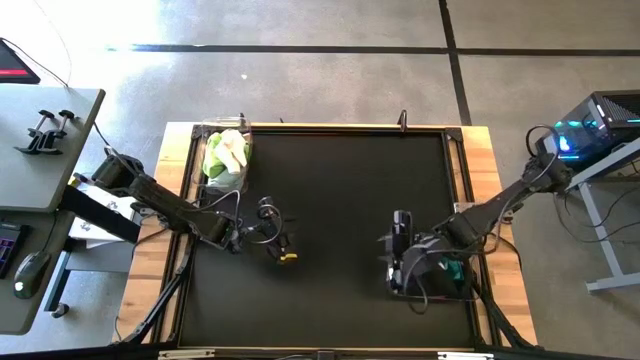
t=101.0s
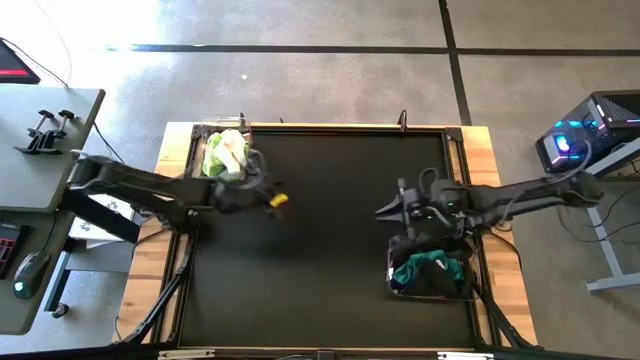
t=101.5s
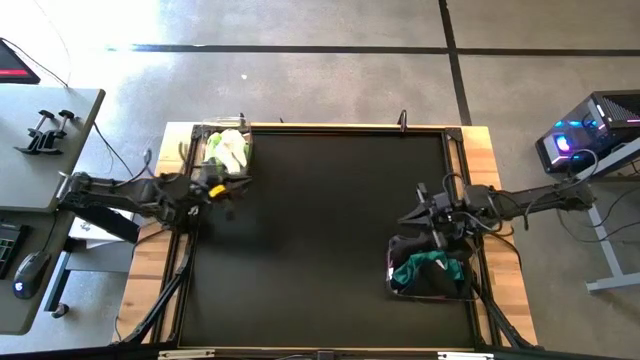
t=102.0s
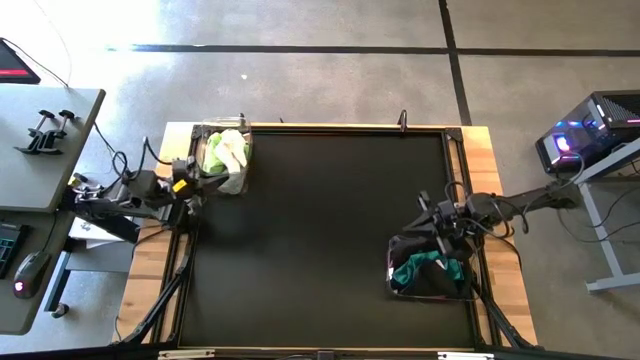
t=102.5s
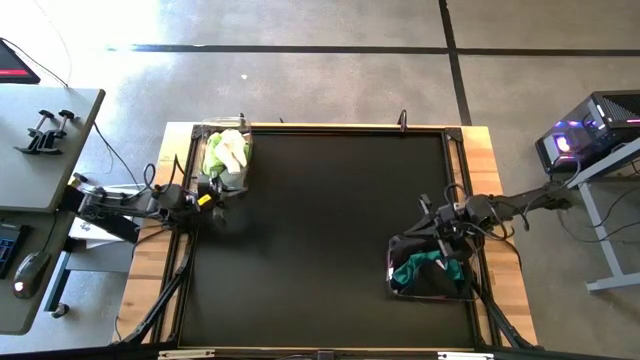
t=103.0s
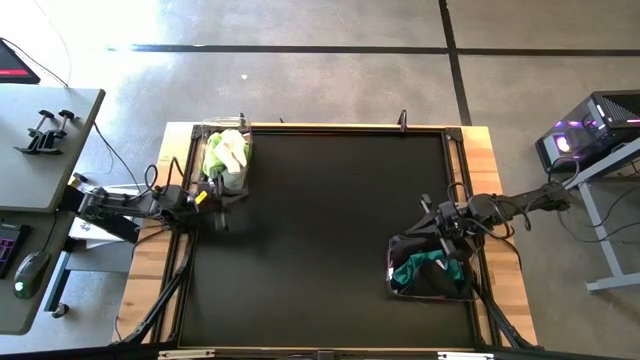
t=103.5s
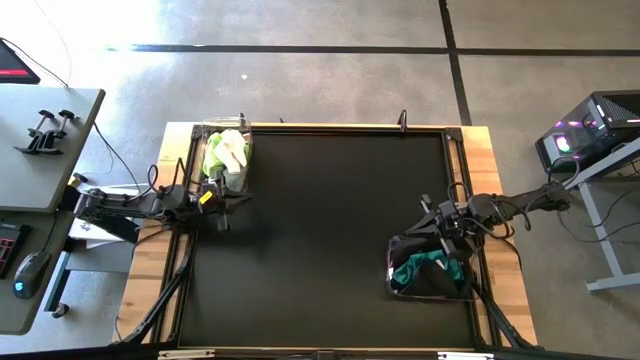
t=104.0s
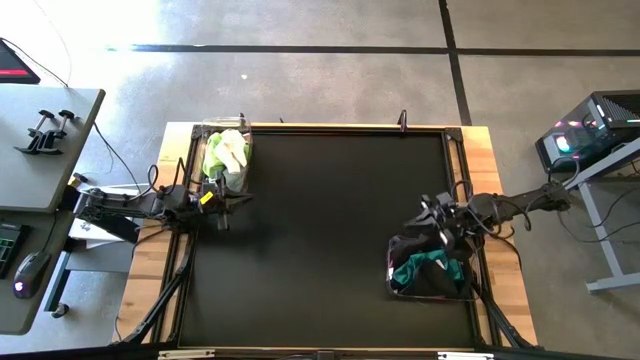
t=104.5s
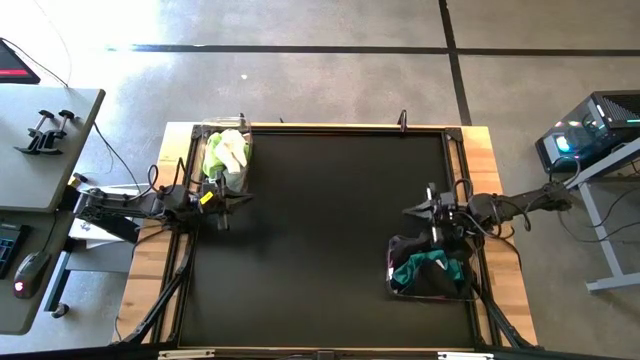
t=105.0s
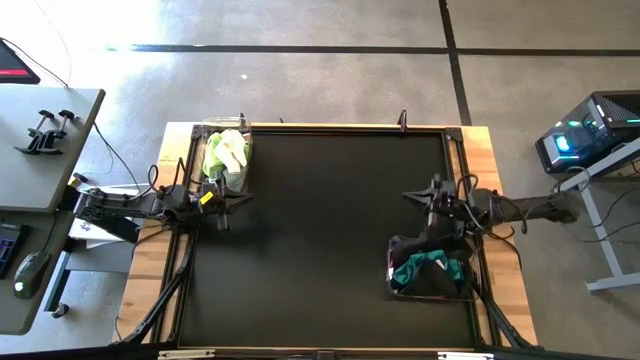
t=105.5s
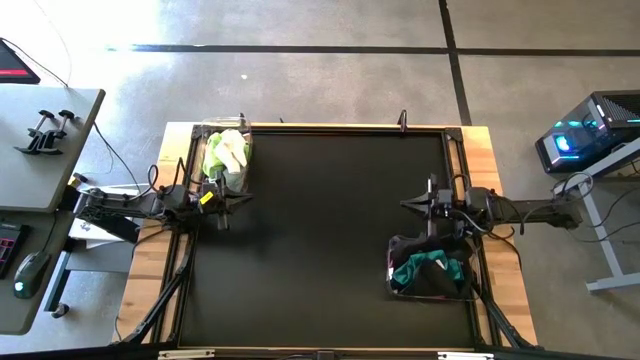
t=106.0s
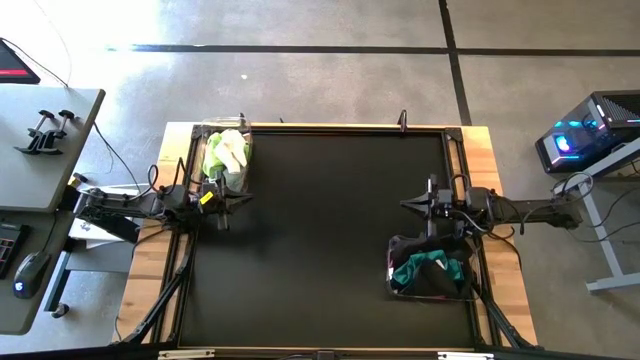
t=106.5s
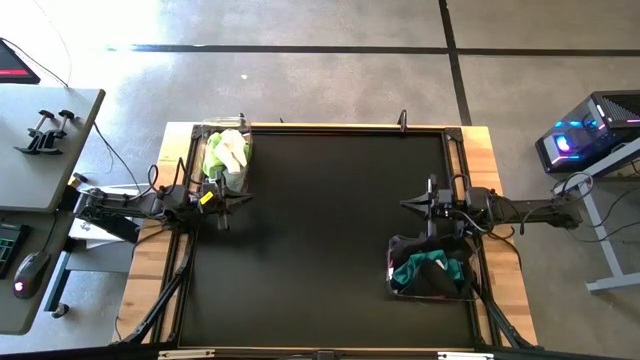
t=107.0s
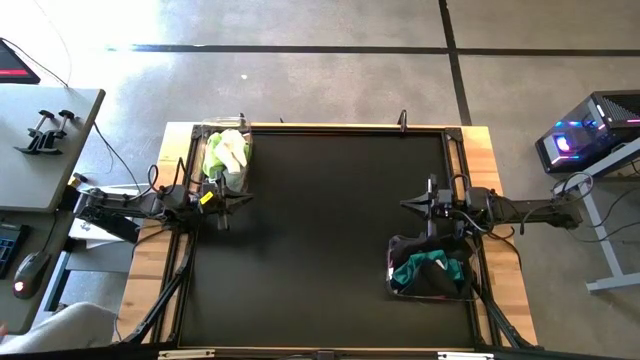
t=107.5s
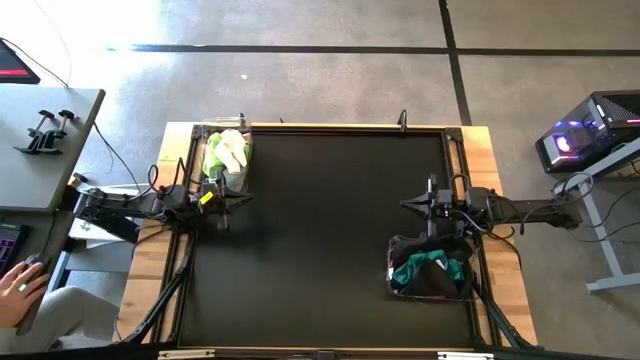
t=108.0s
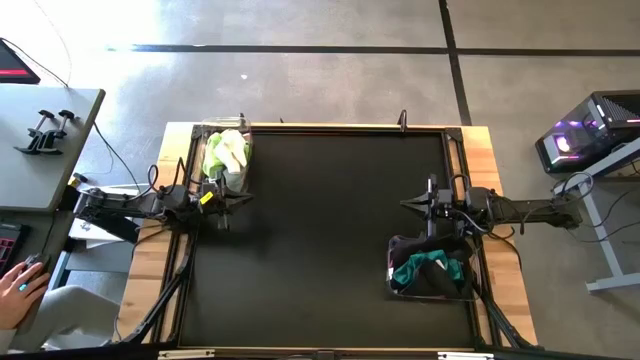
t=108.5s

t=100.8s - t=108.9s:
Task: Sort towels by color in basket
Return to Home Position

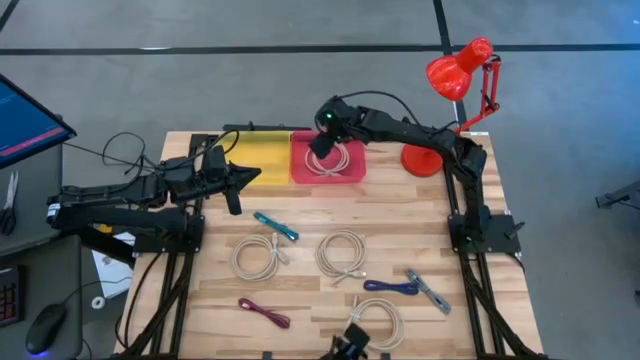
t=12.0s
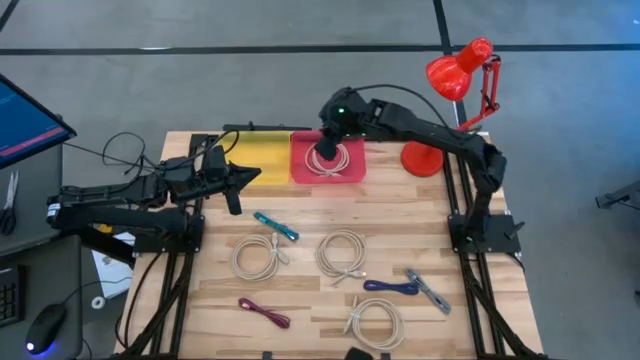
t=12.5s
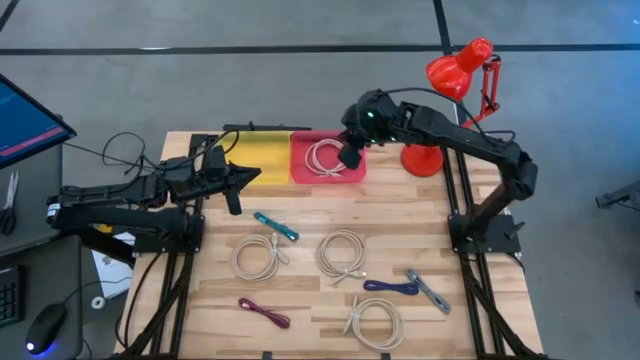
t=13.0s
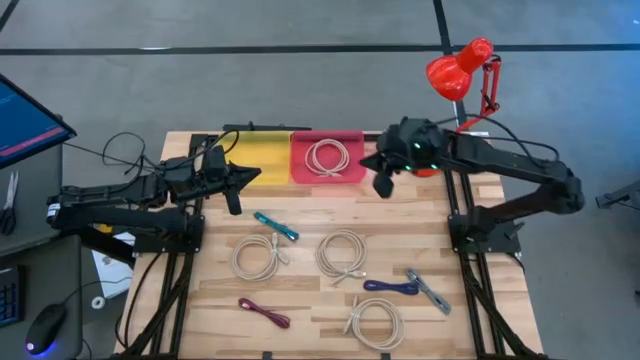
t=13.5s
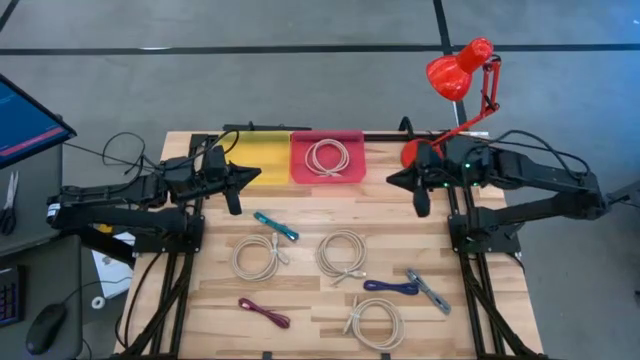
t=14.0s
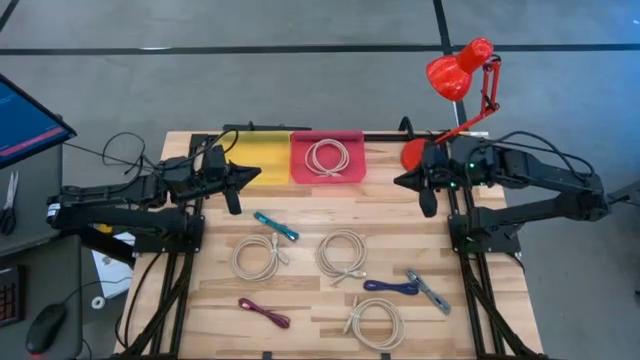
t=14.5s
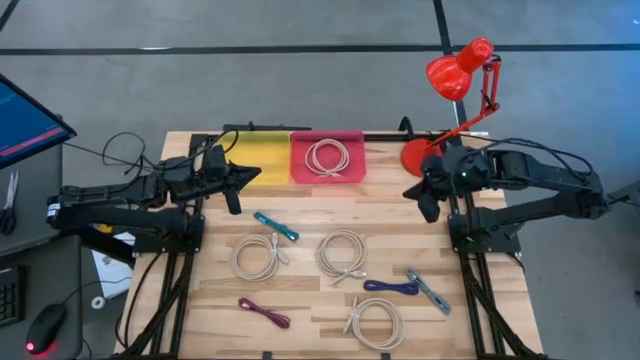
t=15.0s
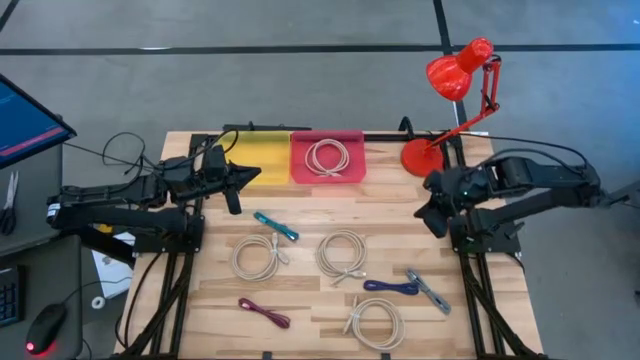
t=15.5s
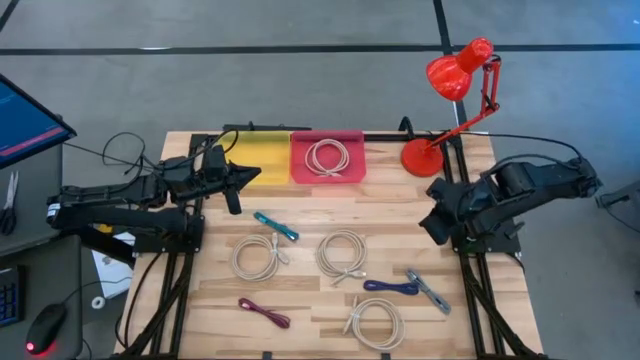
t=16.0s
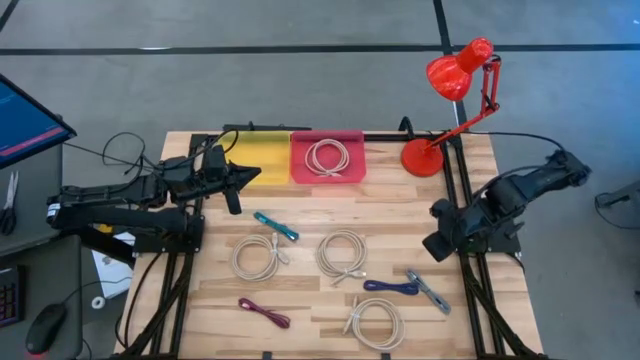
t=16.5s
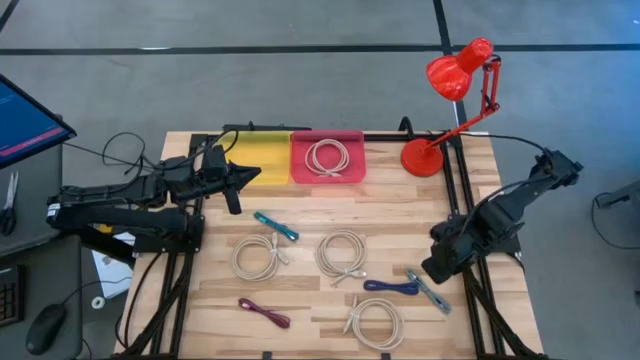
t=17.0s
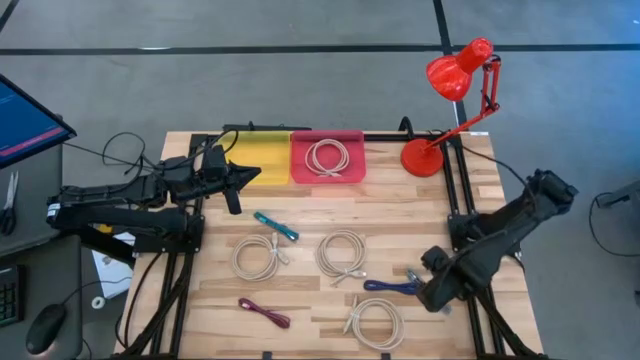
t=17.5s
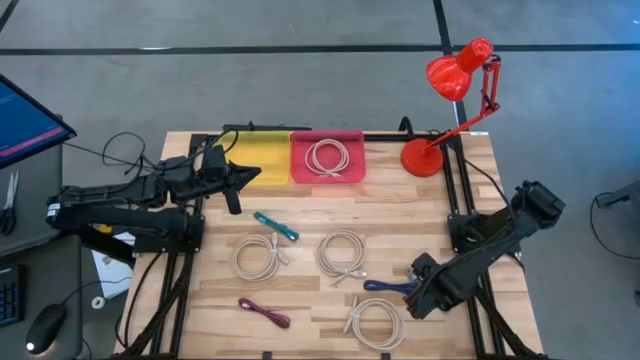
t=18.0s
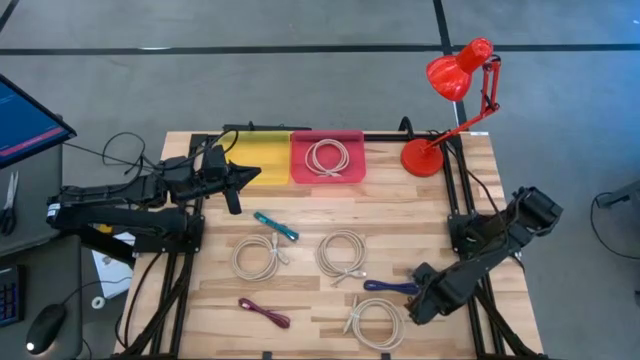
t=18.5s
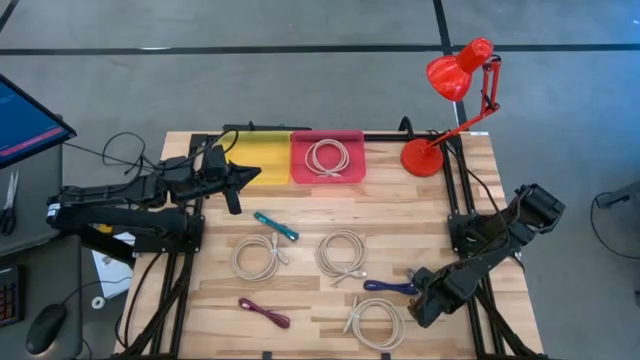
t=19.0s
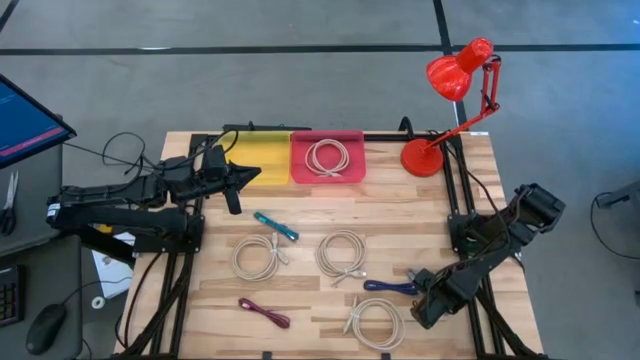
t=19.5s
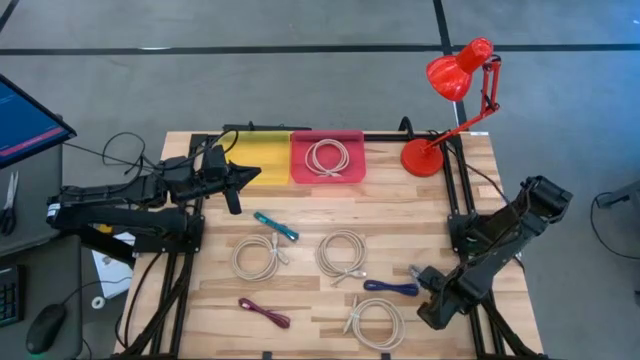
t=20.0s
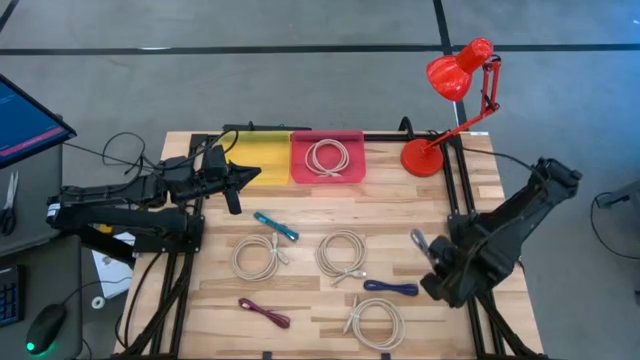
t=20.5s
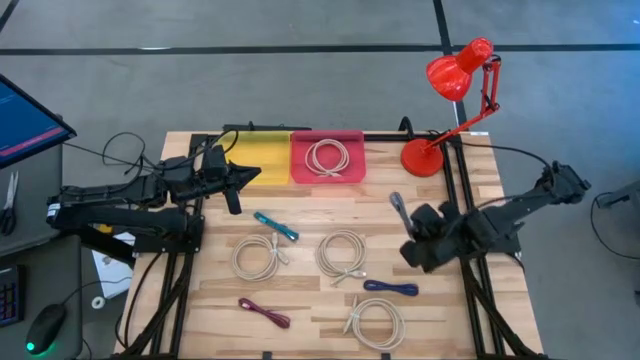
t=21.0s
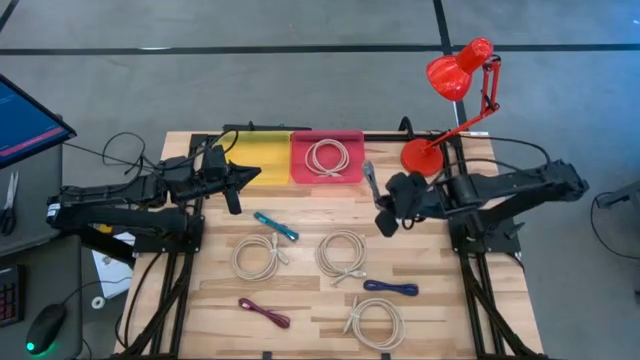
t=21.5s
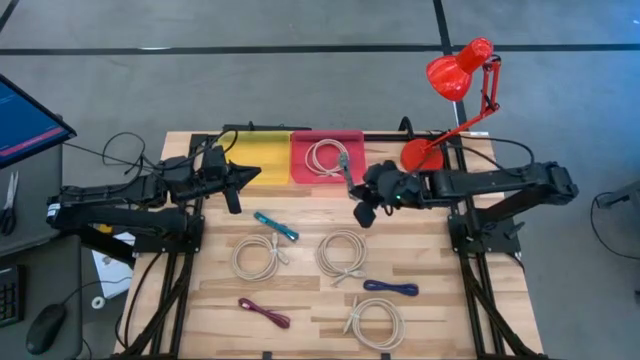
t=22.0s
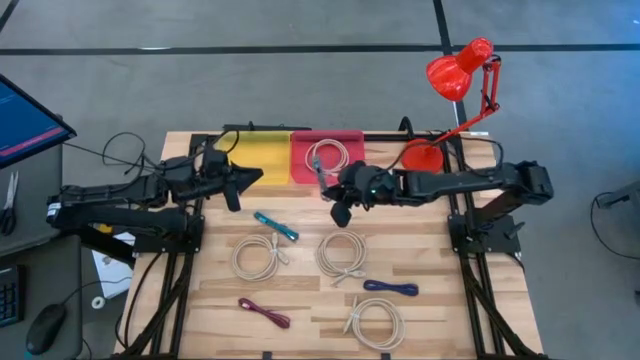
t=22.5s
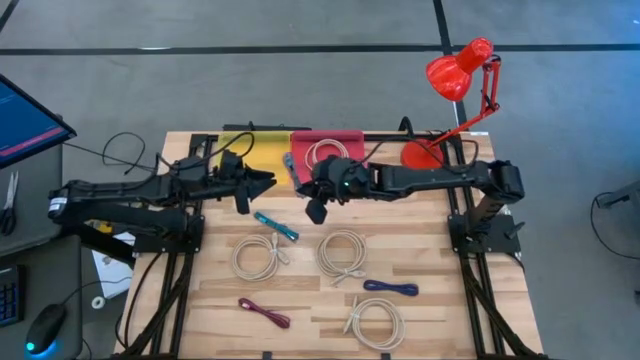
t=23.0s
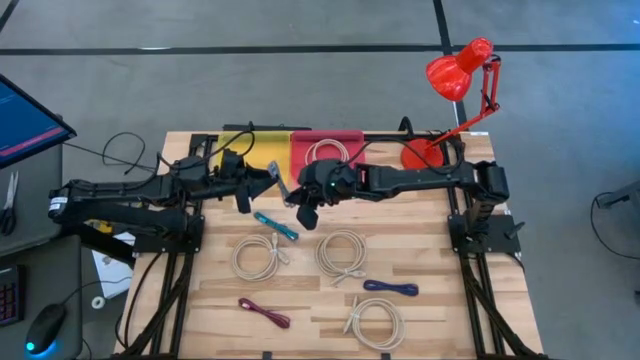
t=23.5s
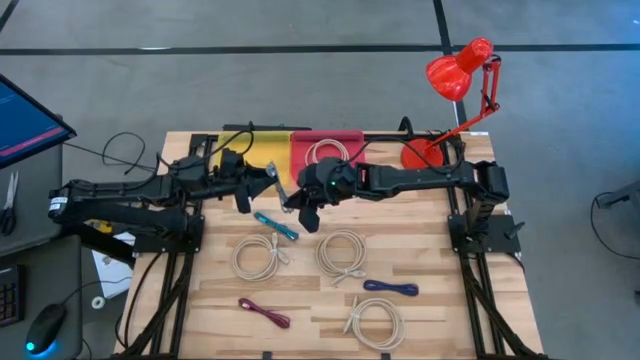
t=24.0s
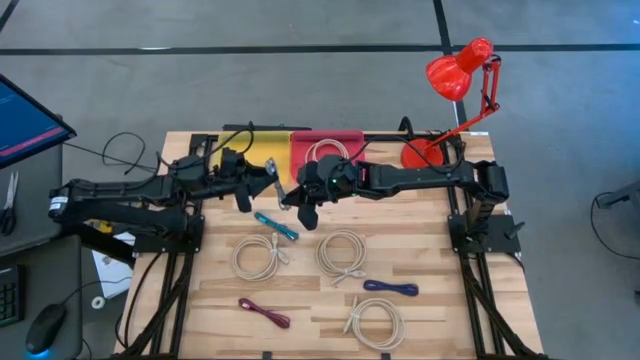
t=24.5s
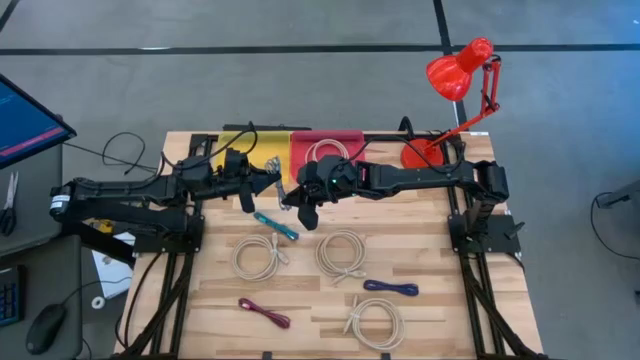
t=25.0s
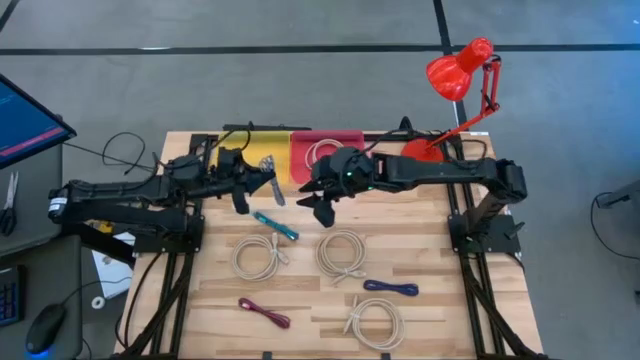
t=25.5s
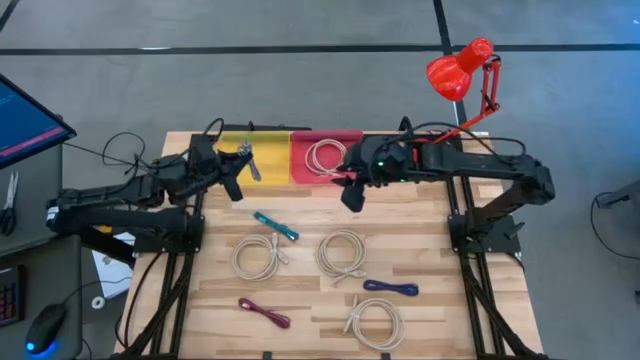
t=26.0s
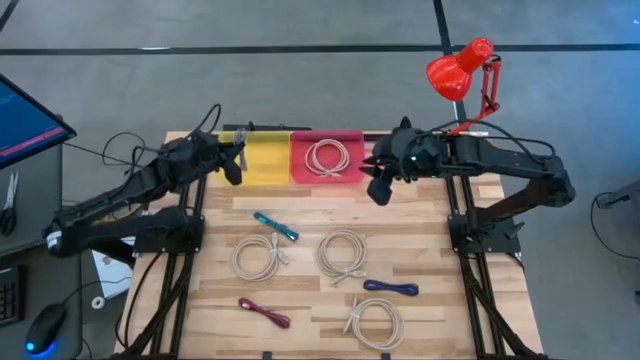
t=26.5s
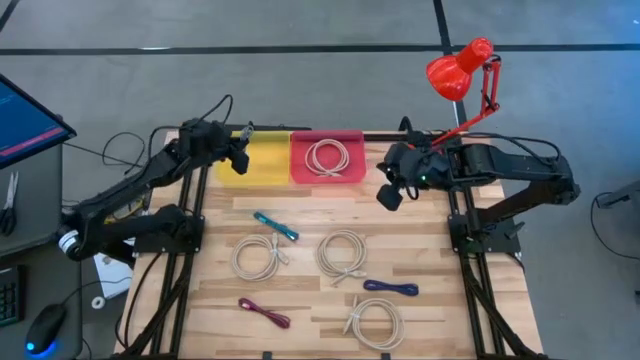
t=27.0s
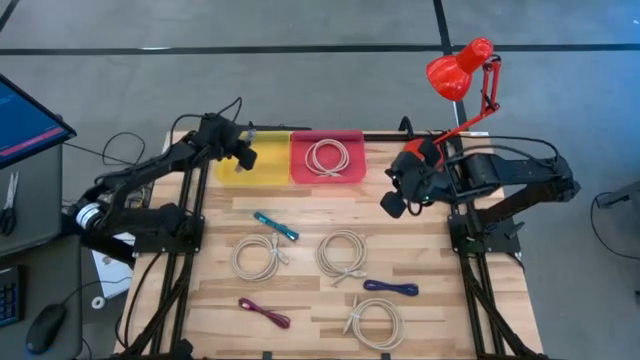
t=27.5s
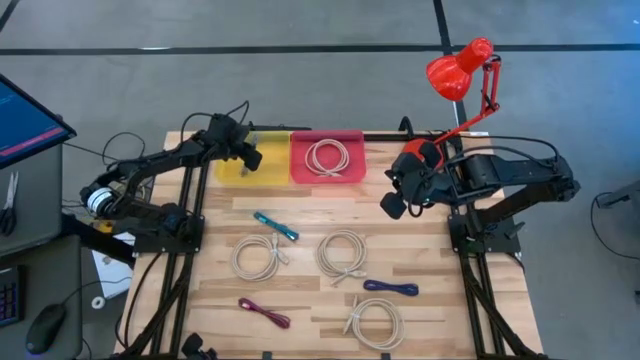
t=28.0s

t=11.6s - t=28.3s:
Task: Pick & Place USB Port
Put the white charger cable into the yellow bin
